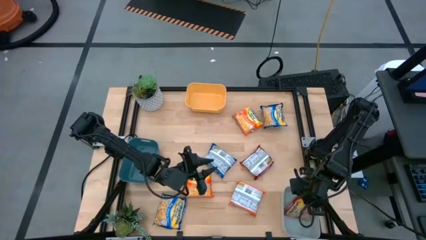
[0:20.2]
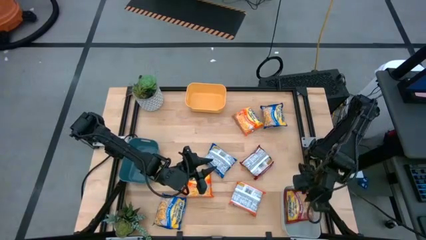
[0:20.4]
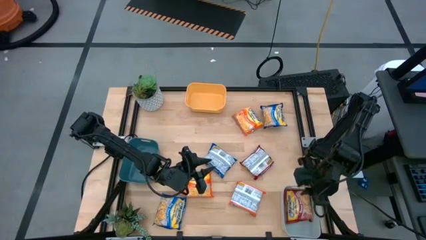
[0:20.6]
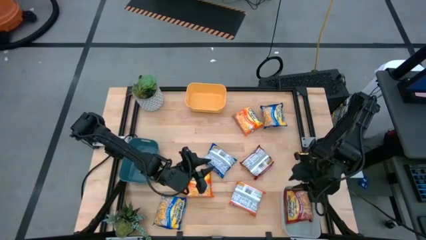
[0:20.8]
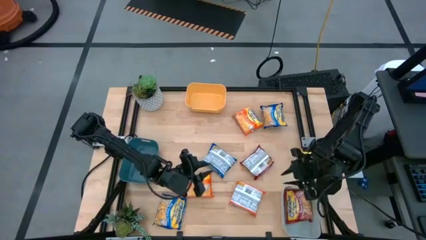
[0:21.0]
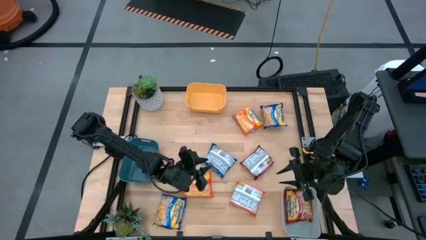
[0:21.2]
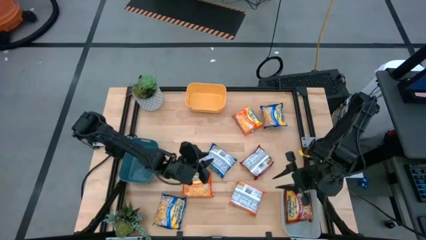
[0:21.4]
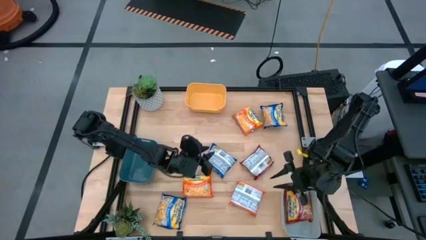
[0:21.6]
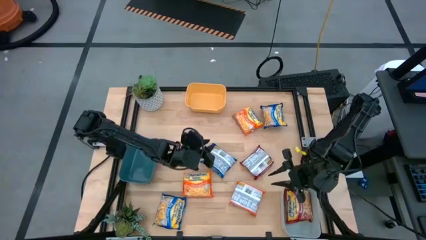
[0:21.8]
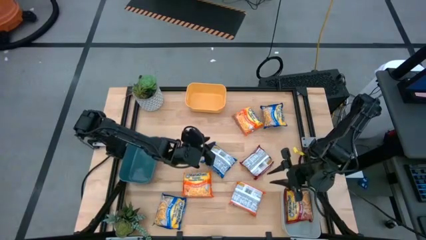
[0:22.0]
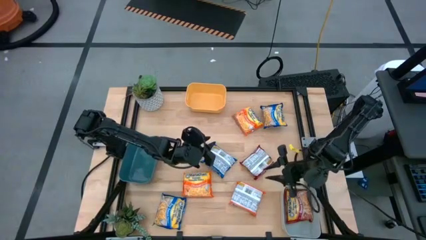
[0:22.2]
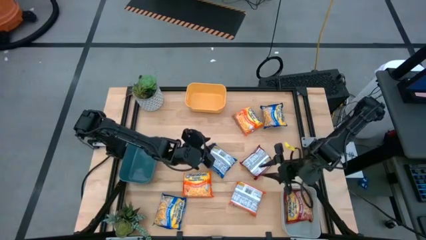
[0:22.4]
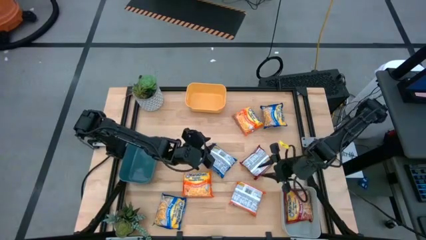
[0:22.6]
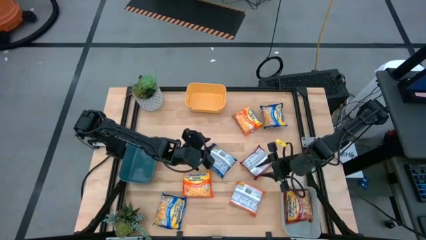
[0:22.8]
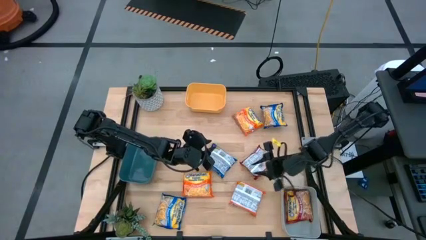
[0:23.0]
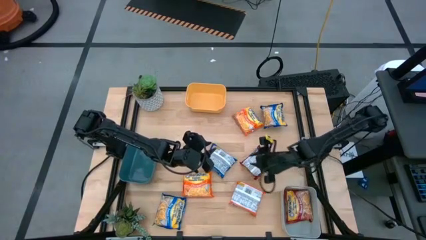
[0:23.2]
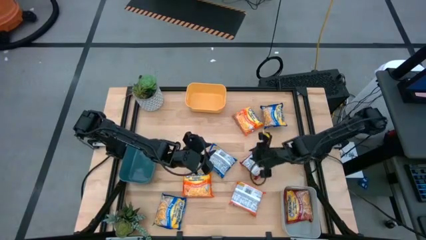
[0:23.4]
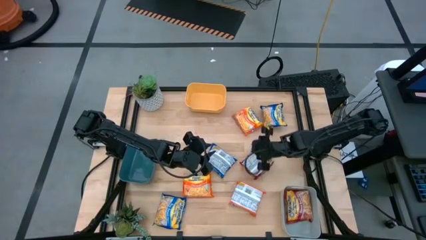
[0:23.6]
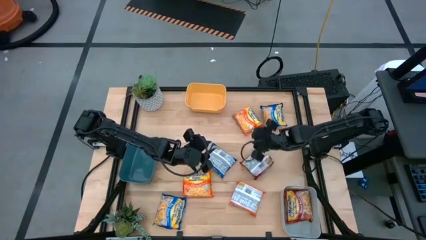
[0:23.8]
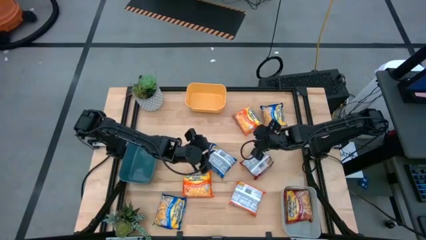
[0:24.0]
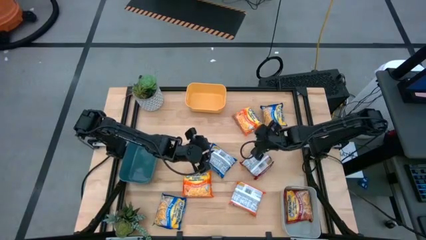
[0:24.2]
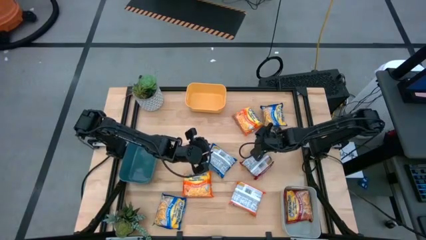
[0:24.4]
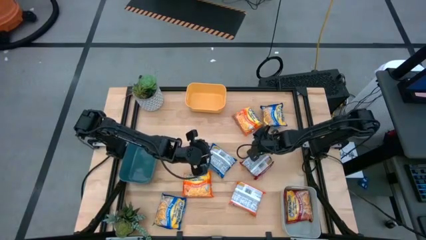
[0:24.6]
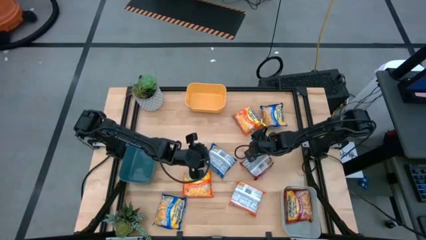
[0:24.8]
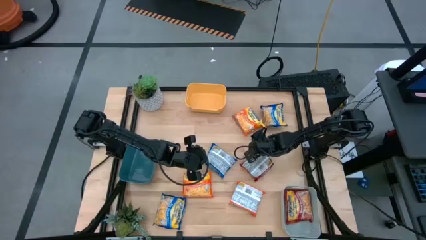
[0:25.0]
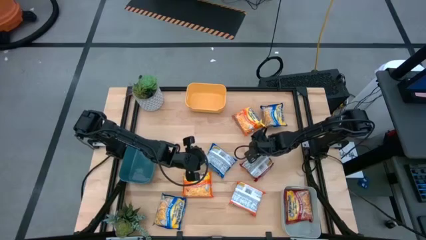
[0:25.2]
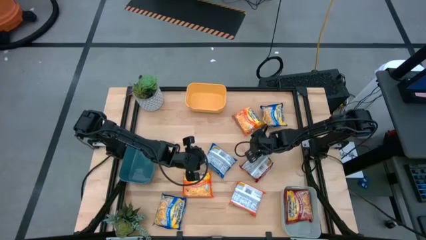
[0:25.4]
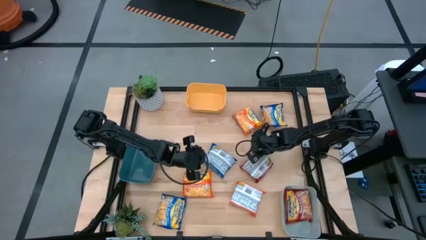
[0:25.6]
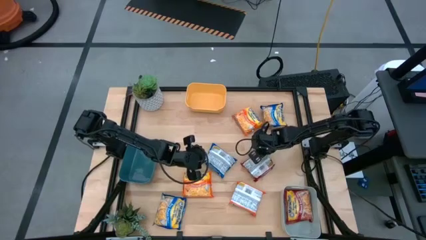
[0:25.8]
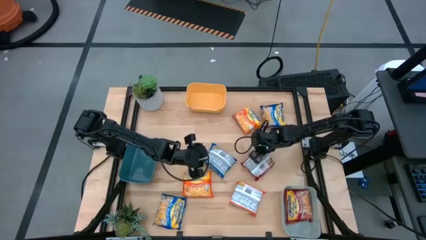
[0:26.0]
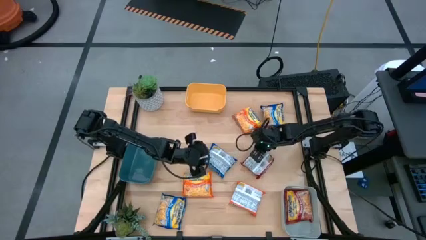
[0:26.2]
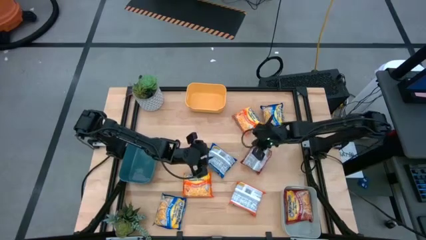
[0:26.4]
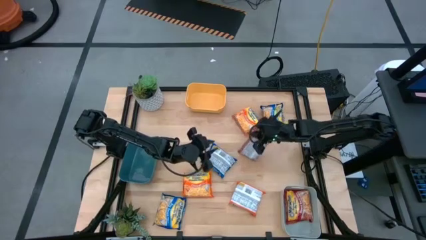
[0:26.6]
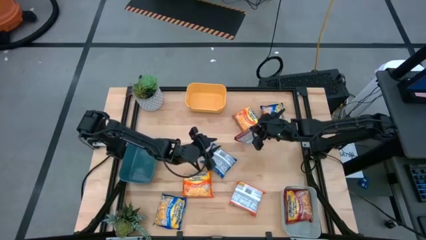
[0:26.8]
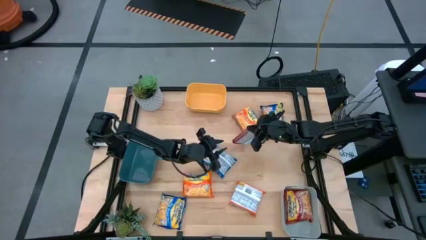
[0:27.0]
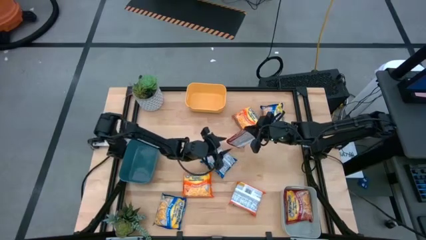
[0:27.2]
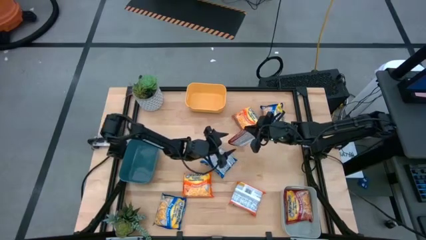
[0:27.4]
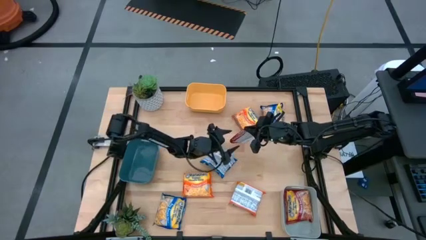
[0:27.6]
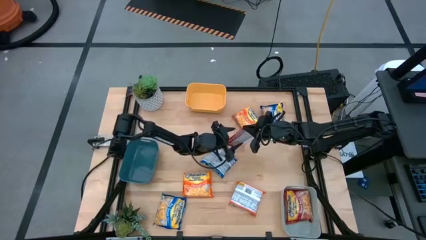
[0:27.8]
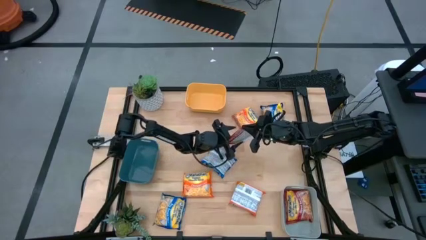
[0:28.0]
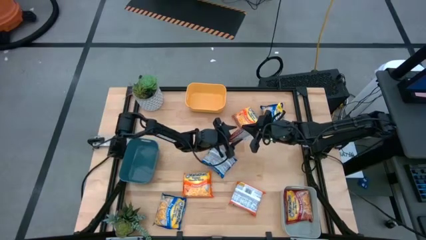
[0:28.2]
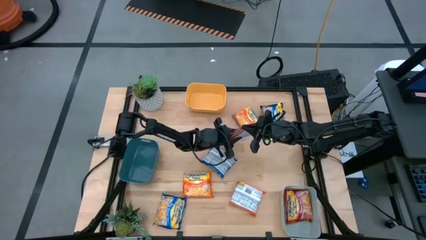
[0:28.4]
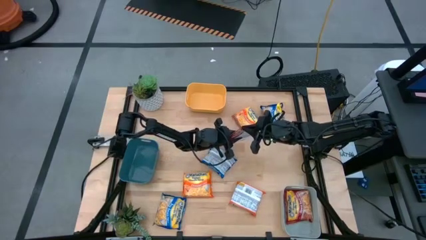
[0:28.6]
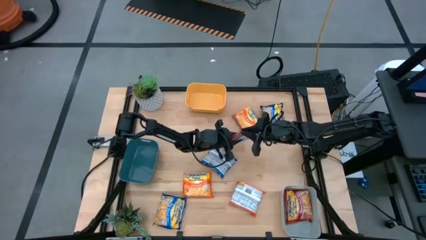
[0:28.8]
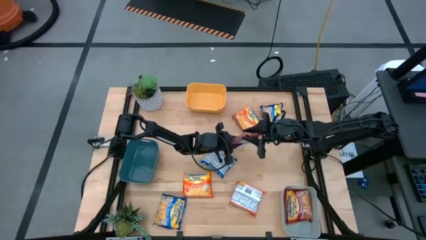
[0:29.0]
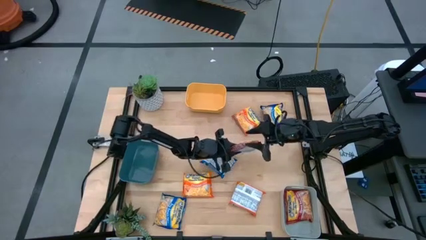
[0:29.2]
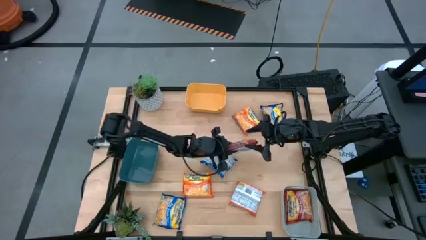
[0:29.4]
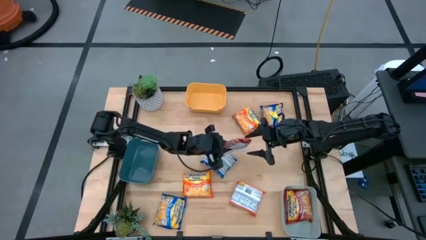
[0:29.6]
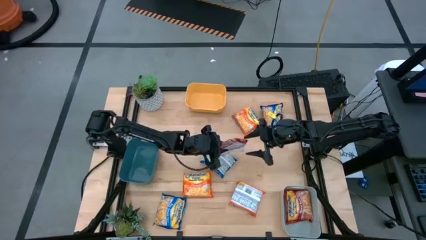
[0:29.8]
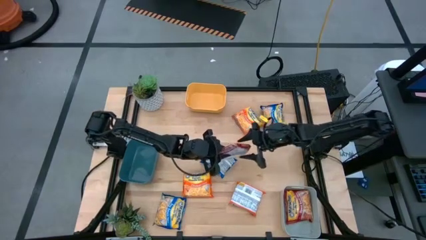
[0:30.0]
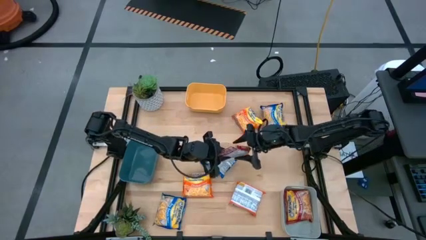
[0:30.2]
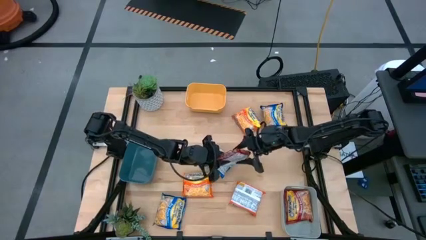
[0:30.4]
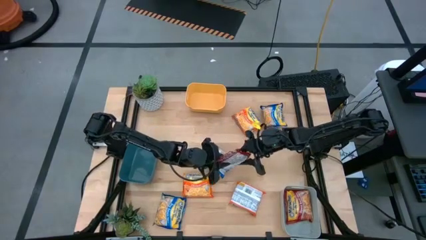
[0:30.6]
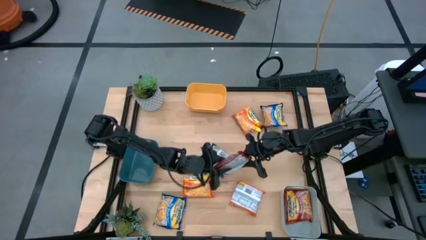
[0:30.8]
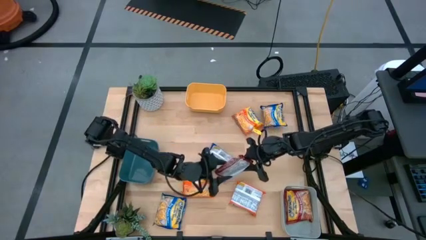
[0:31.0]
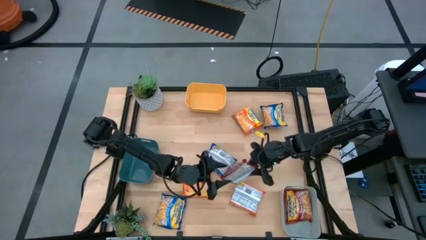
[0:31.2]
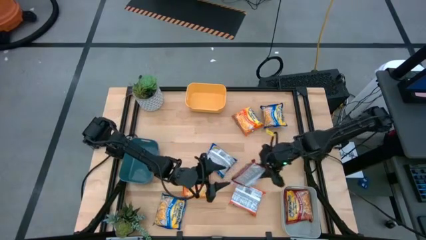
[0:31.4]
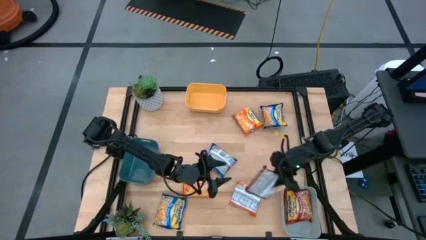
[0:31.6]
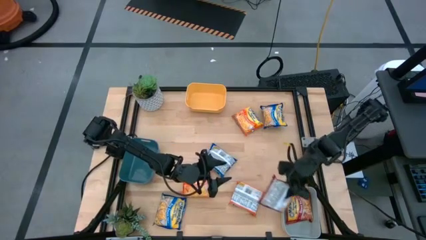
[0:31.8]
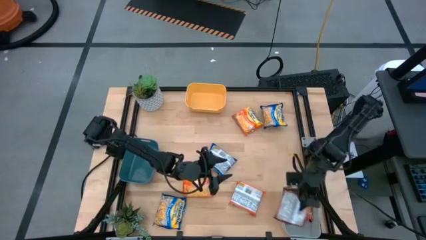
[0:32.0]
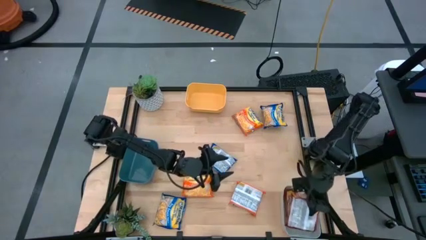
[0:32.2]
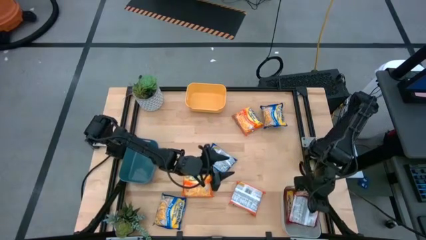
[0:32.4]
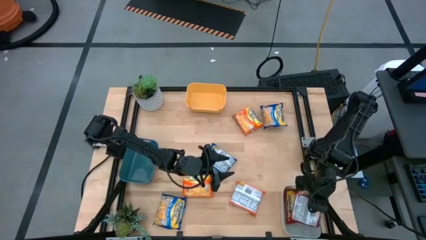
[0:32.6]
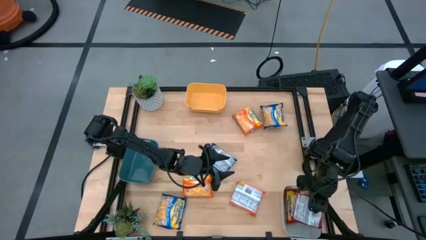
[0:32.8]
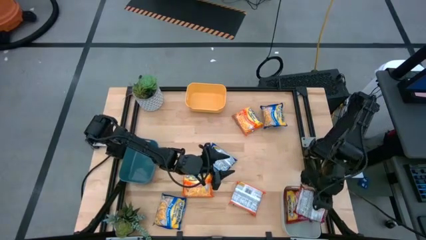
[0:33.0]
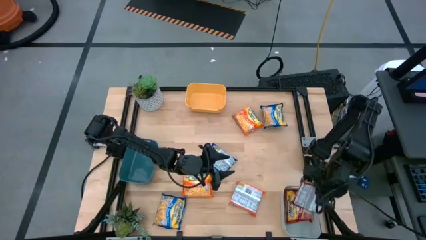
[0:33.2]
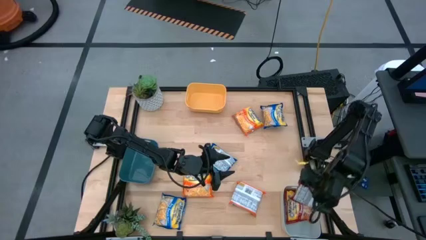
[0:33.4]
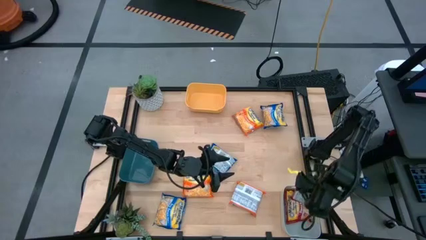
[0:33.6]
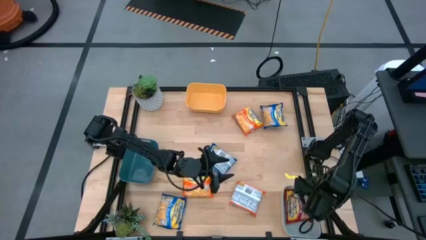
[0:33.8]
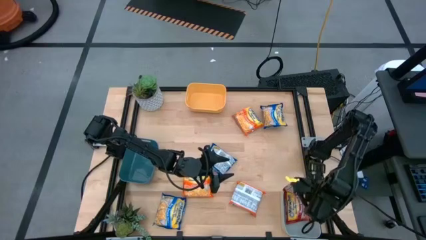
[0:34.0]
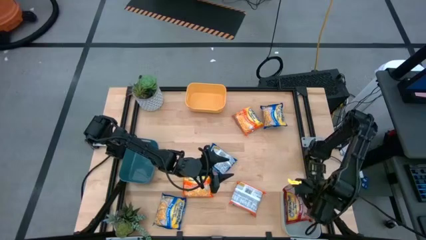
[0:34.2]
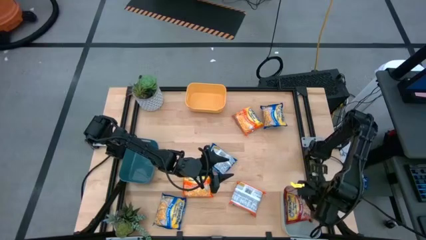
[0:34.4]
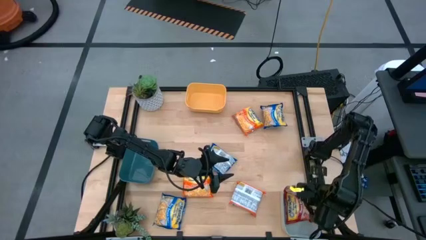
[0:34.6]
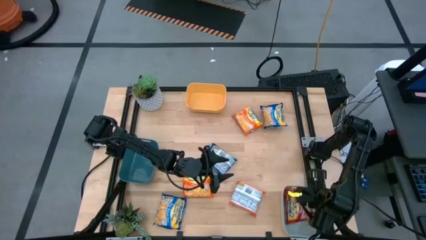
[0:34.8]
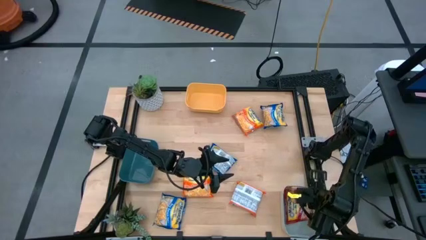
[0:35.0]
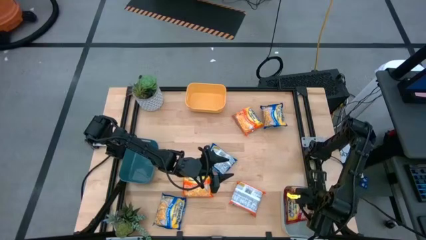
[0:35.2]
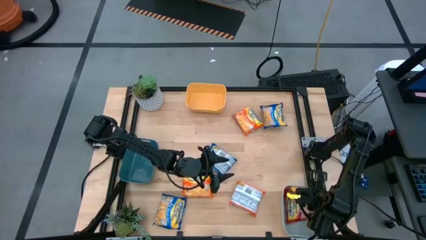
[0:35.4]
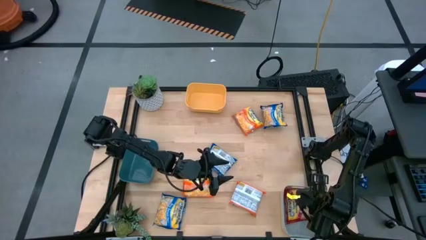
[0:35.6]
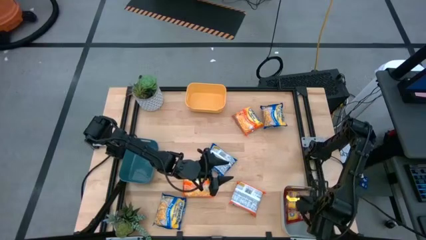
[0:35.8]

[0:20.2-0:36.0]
Task: Sort Maruchan noodles
Put the red noodle pack into the gray bin

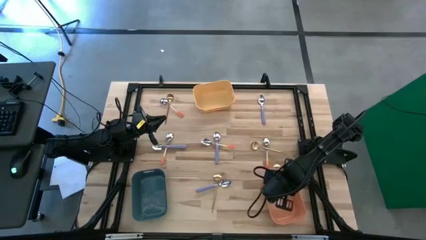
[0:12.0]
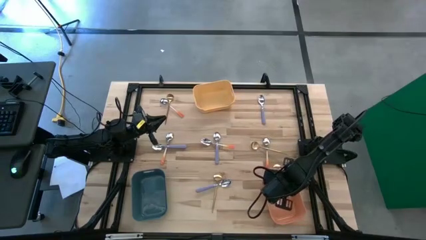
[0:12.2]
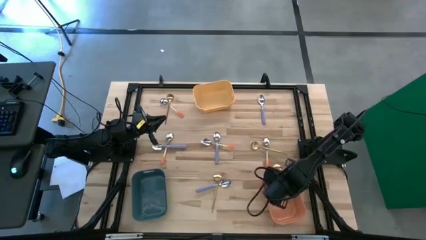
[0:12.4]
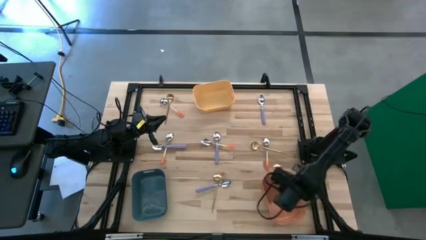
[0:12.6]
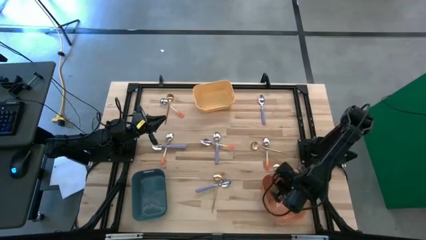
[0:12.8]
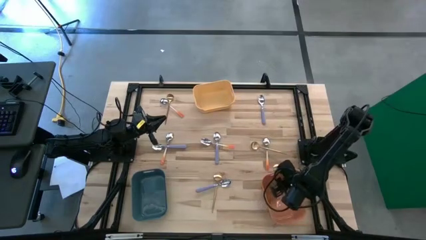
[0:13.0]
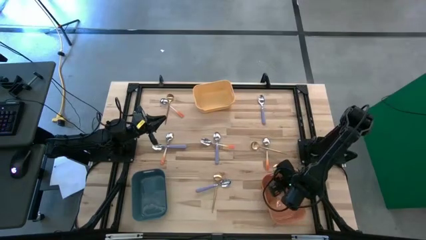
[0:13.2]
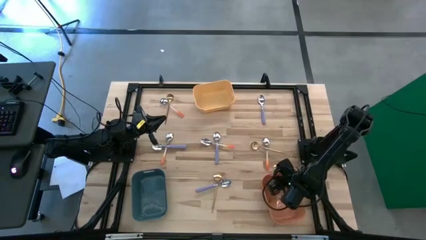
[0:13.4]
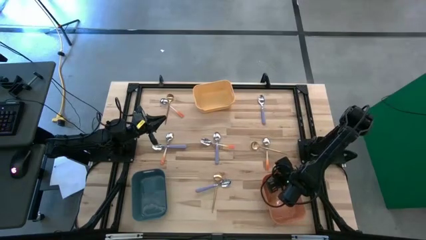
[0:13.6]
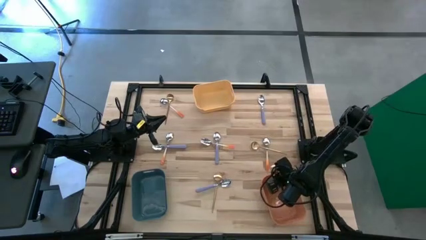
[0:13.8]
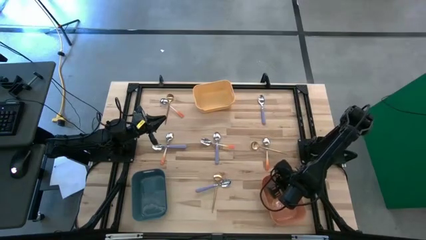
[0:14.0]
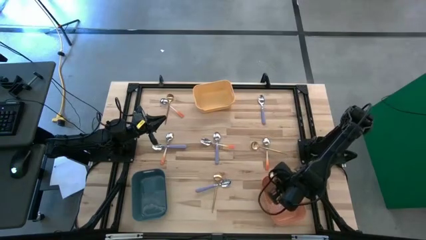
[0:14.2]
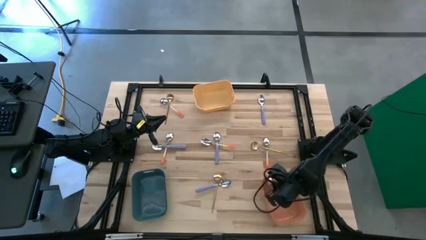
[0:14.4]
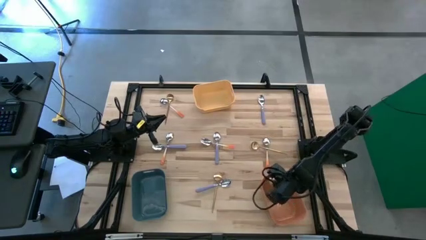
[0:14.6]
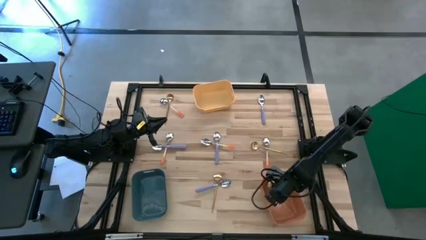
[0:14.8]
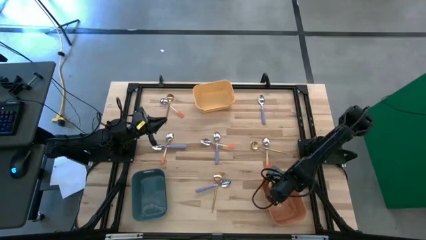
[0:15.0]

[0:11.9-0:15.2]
Task: Sort silverware by color (type)
Put the top right golden spoon into the orange bin
